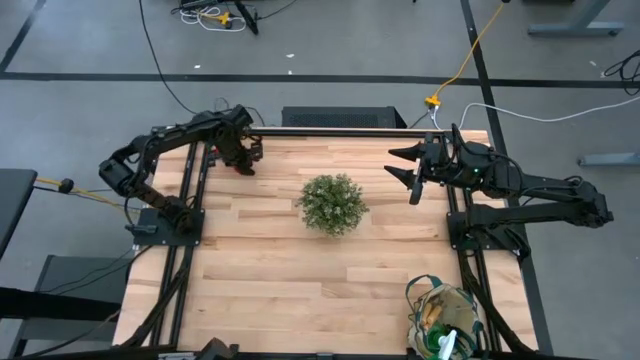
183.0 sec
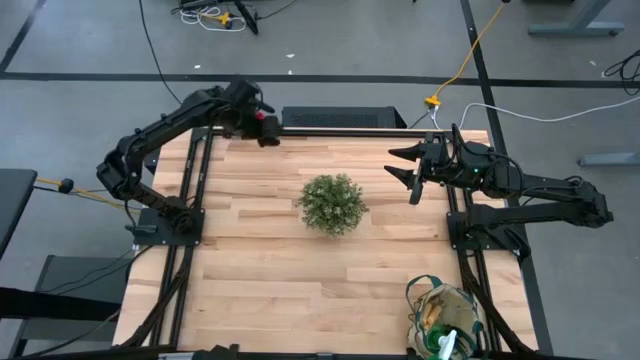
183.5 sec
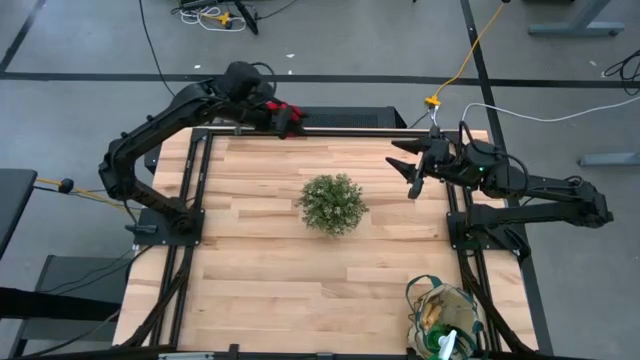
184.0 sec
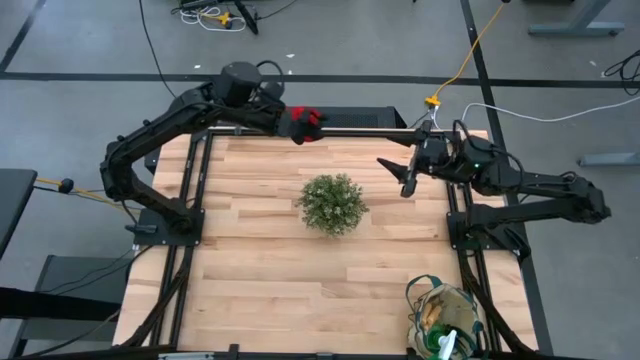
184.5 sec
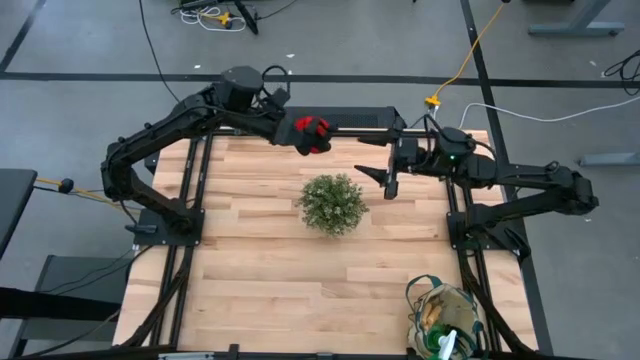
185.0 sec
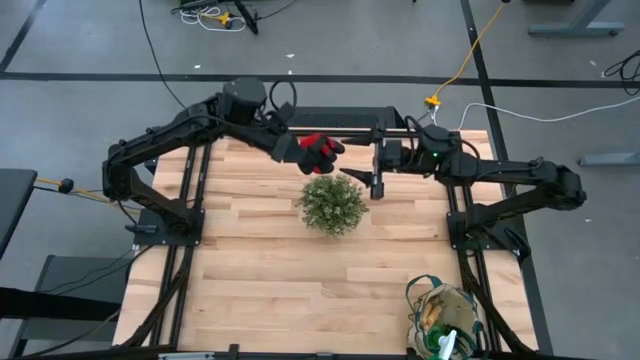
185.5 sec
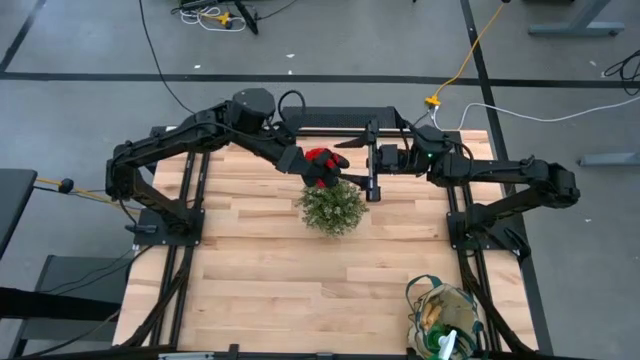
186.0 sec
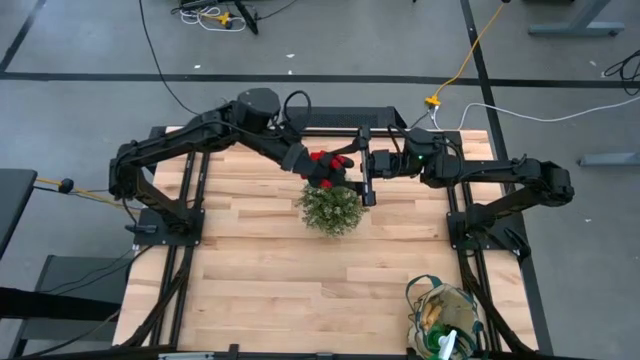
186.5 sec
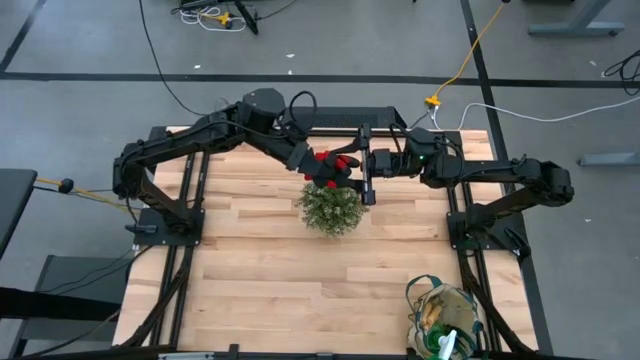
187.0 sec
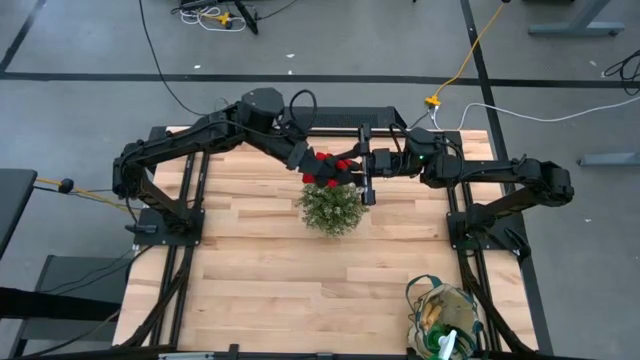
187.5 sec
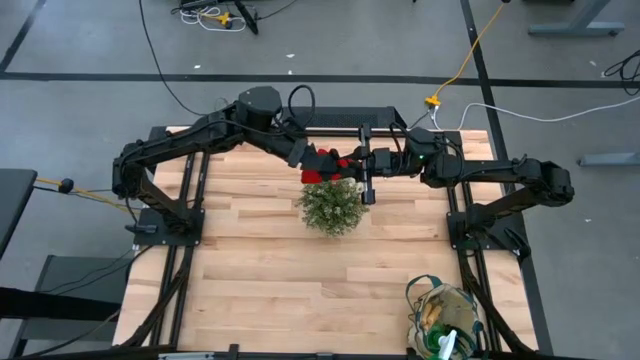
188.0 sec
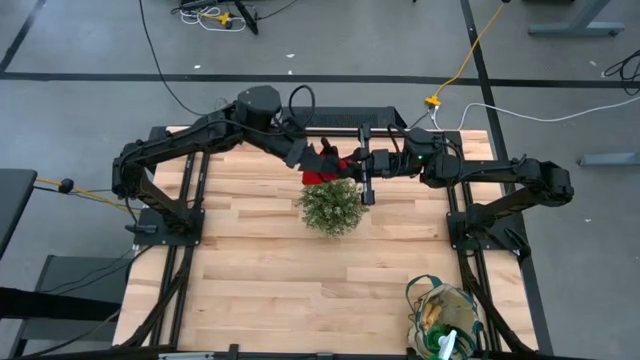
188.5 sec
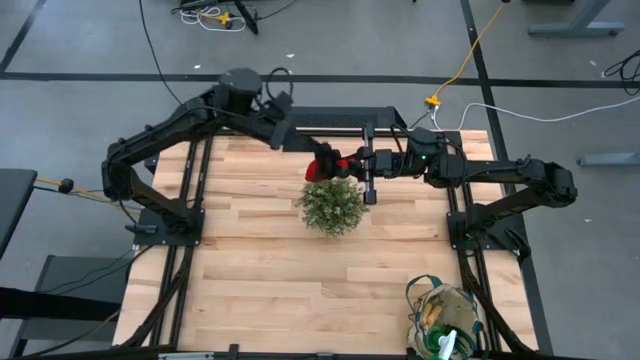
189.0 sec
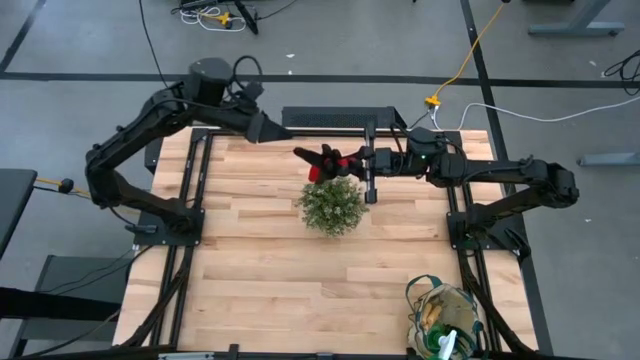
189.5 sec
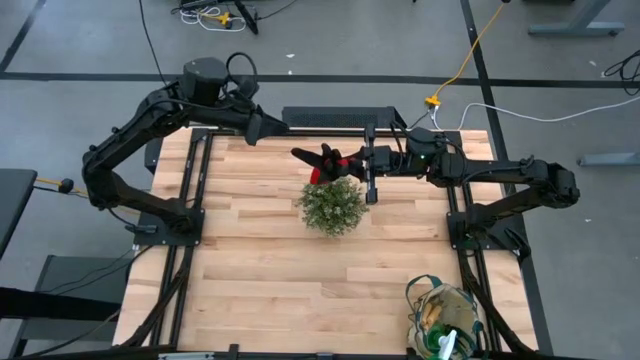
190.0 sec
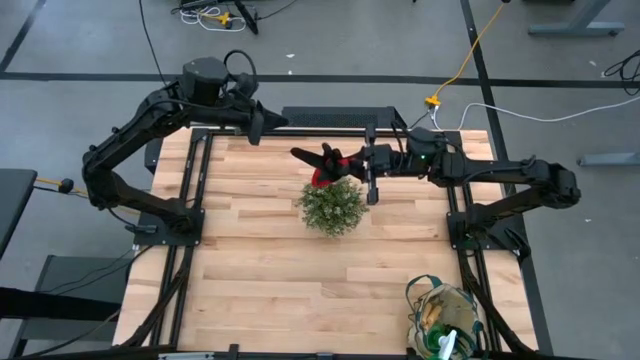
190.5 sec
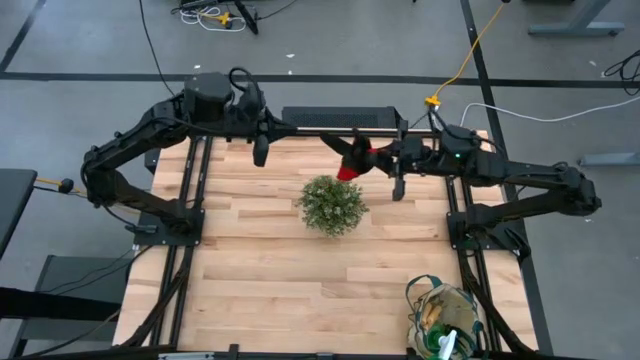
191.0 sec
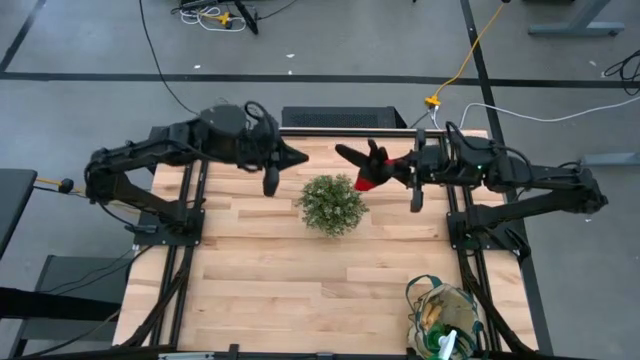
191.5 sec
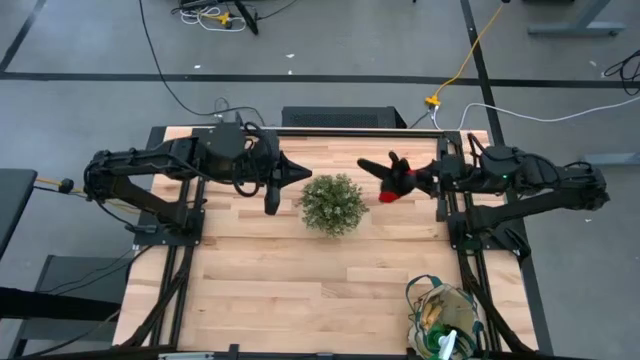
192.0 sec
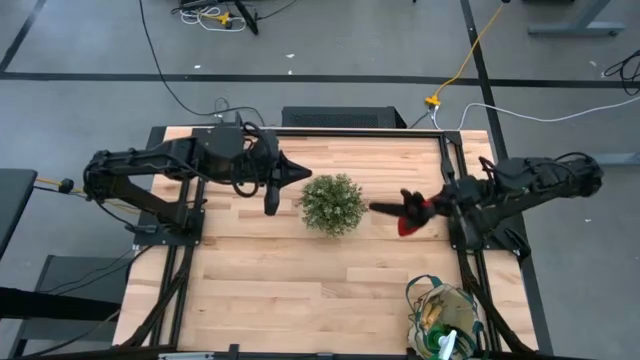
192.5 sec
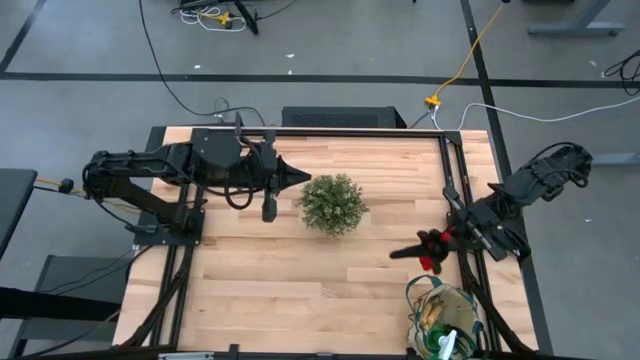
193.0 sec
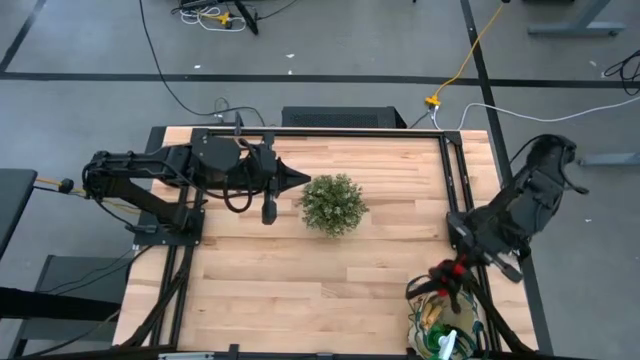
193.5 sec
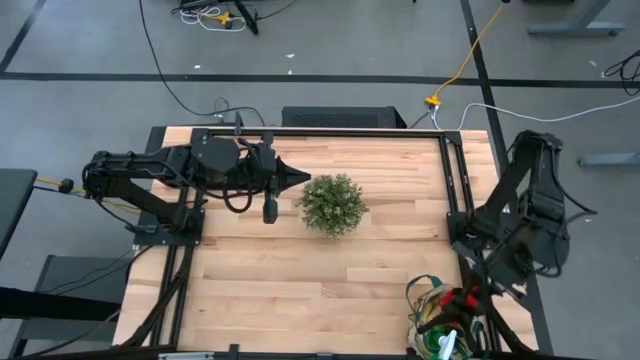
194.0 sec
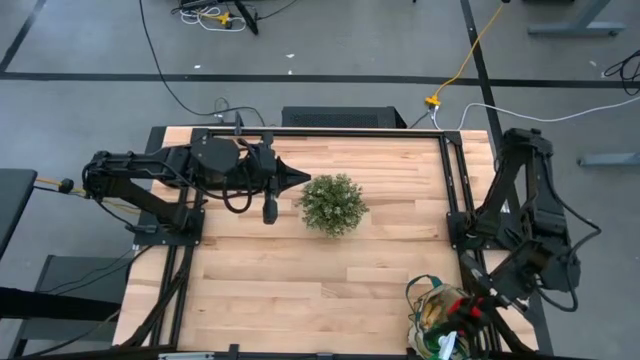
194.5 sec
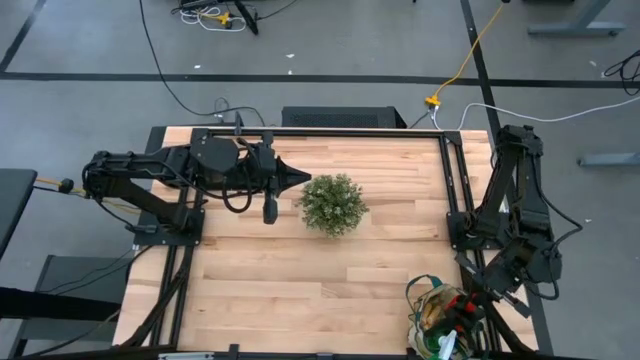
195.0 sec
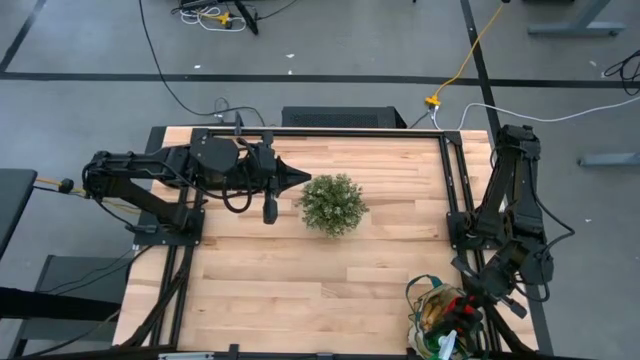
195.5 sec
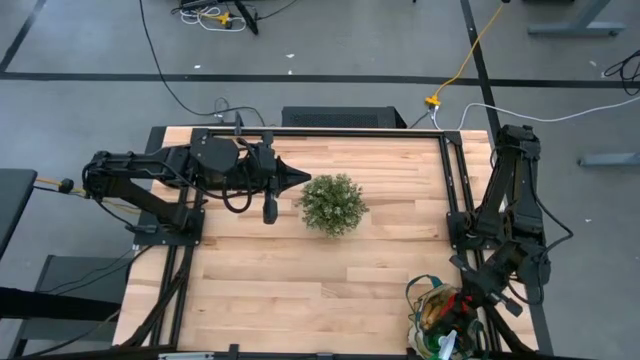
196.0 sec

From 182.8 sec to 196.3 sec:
Task: Pick & Place Garden tools in Gardening bag
Put the red gloves into the white gardening bag

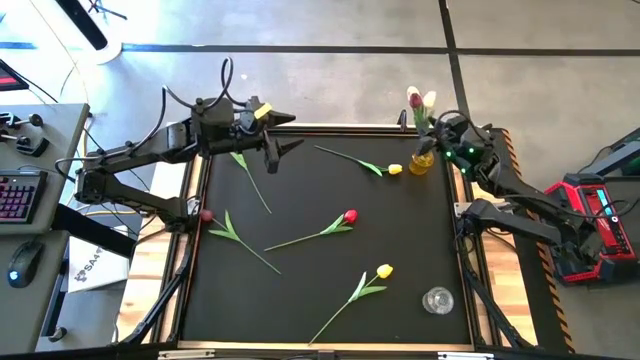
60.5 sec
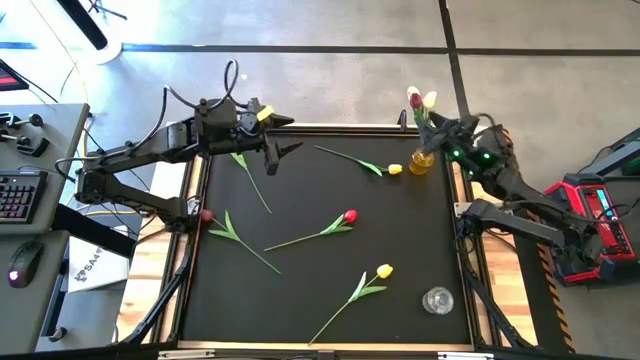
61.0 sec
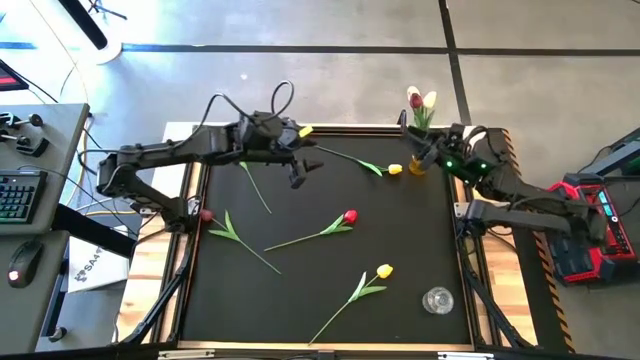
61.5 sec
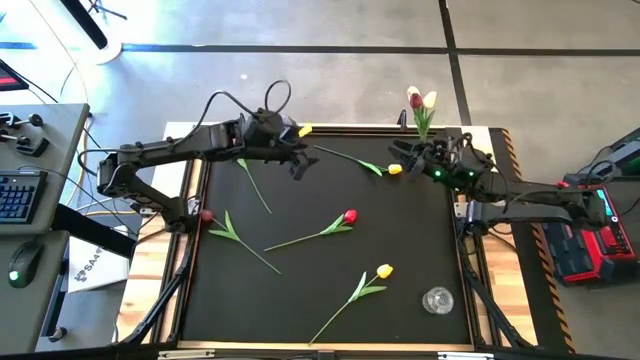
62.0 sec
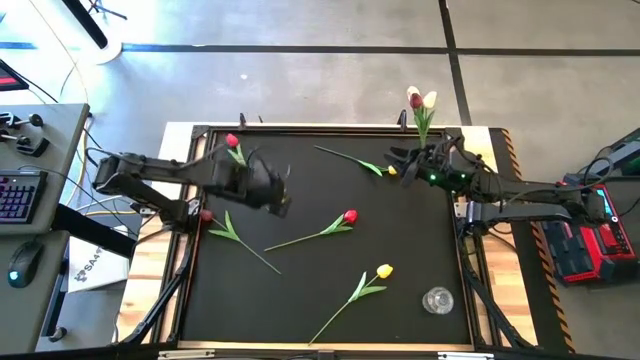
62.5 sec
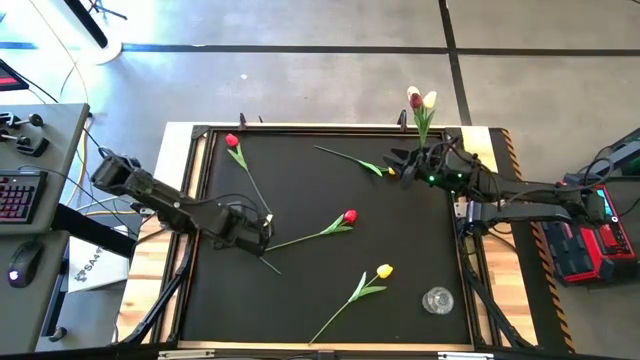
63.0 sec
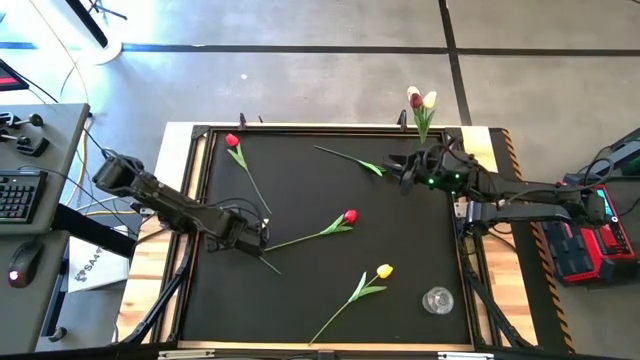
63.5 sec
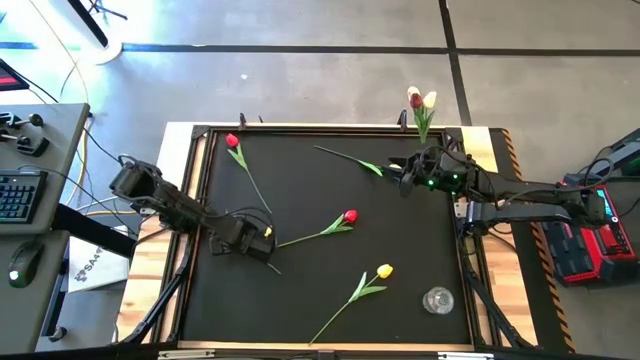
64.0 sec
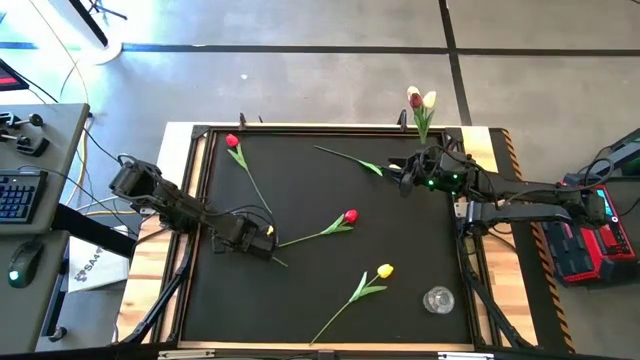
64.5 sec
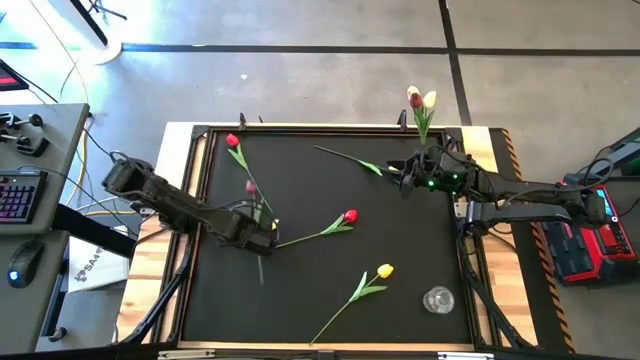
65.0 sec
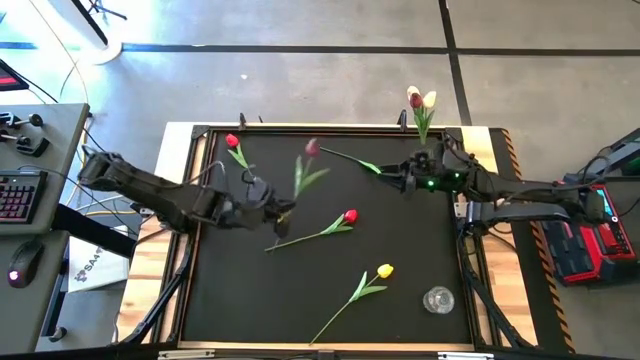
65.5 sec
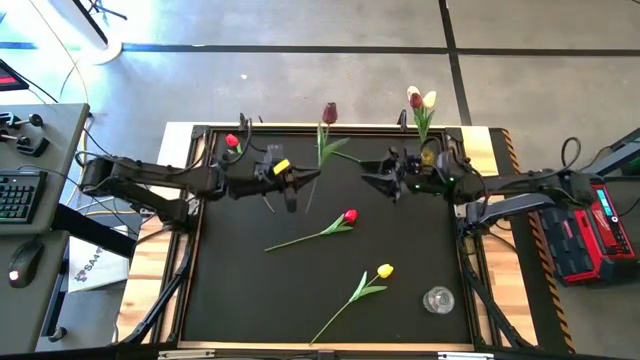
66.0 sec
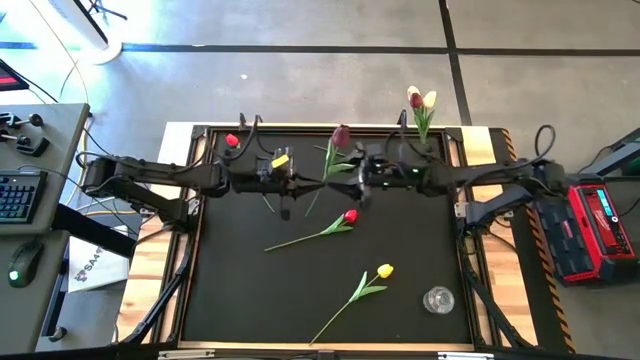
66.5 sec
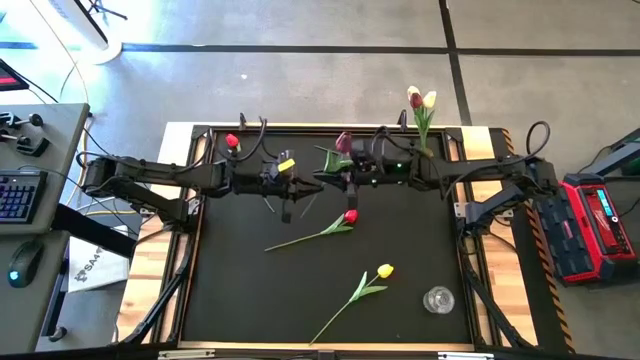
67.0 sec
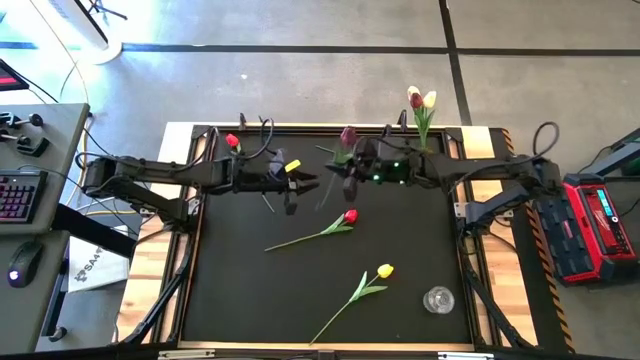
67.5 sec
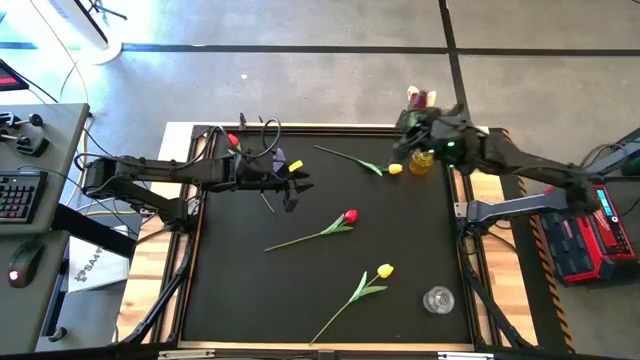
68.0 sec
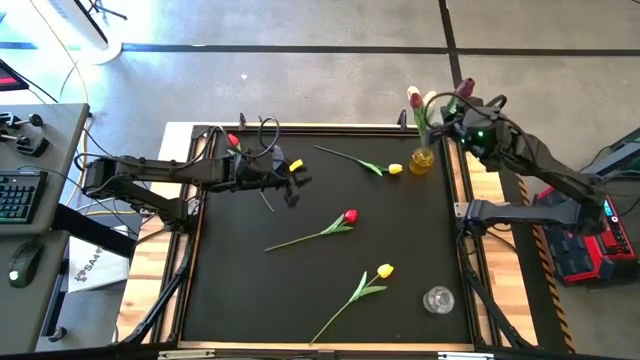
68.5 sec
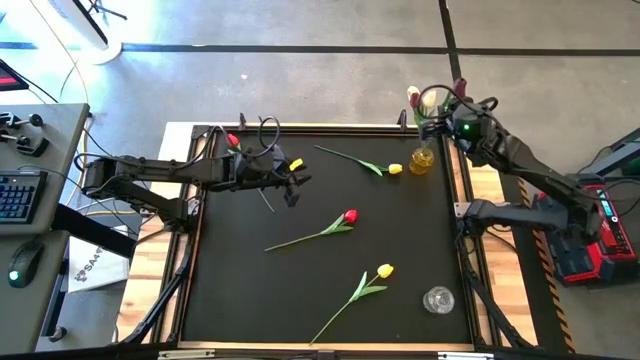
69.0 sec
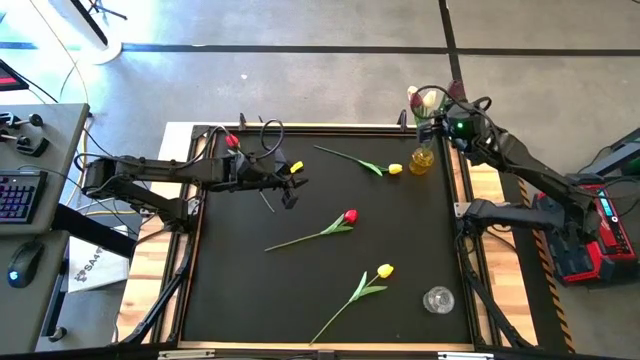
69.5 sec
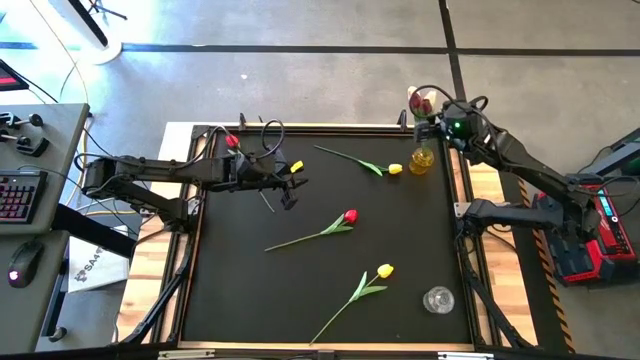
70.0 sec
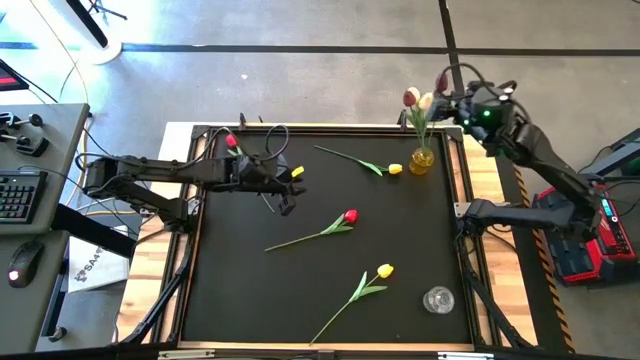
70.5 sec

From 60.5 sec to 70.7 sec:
Task: Sort flowers into vase by color
Put the dark red flower into the yellow flower vase
